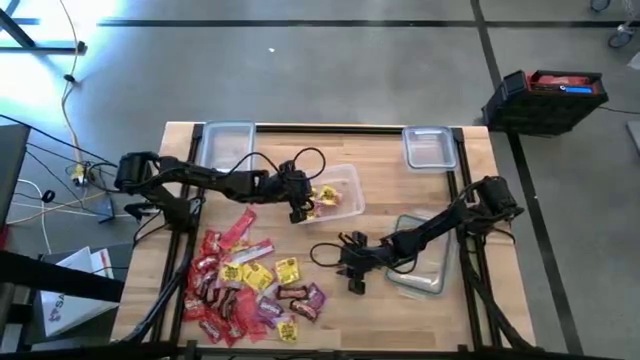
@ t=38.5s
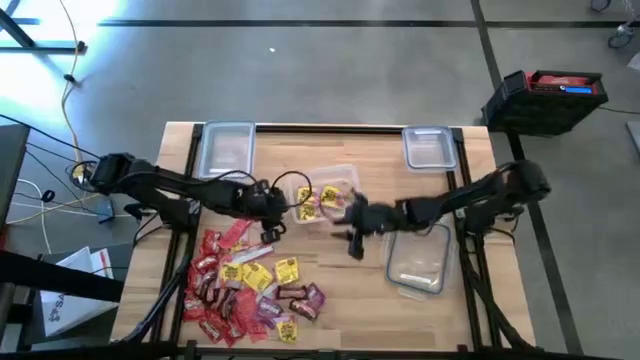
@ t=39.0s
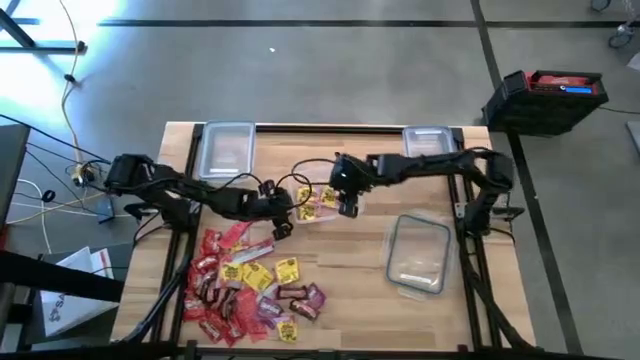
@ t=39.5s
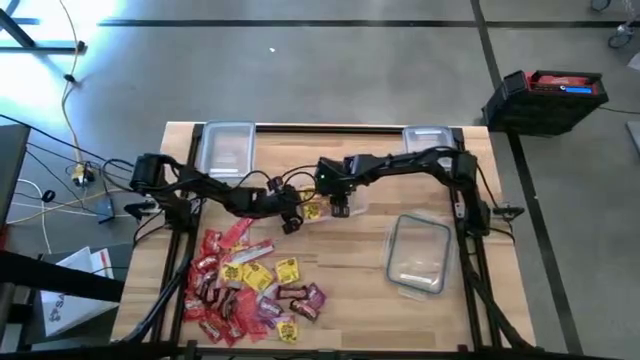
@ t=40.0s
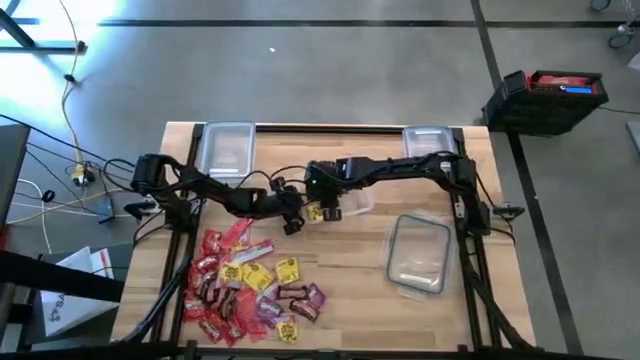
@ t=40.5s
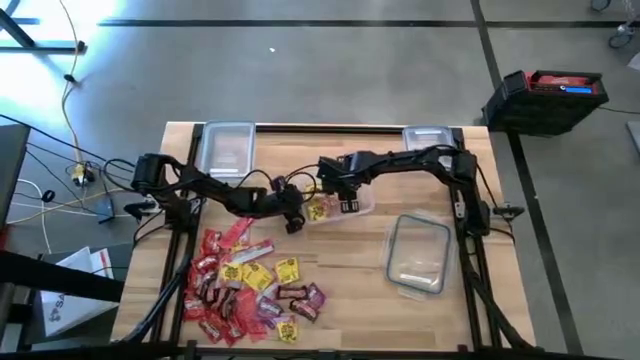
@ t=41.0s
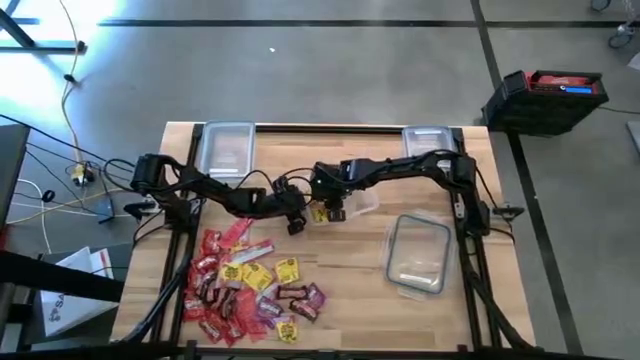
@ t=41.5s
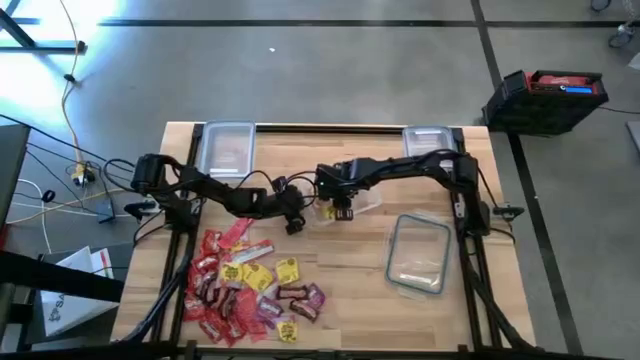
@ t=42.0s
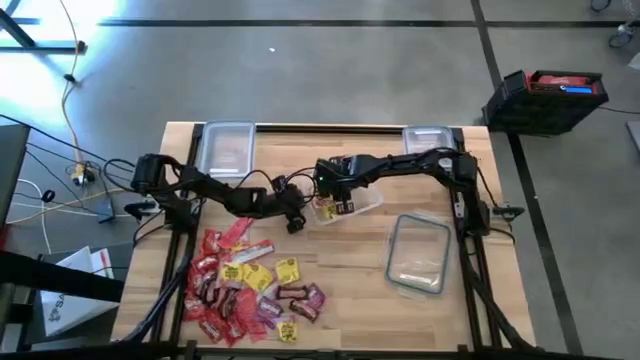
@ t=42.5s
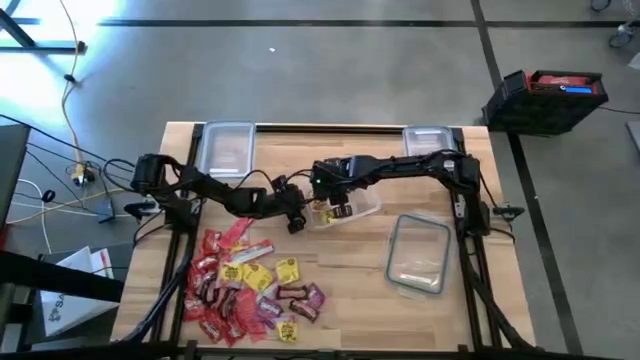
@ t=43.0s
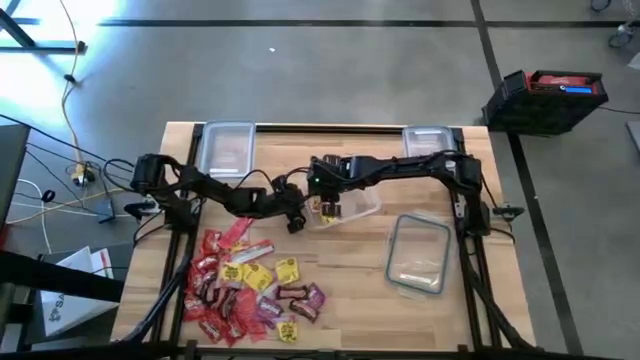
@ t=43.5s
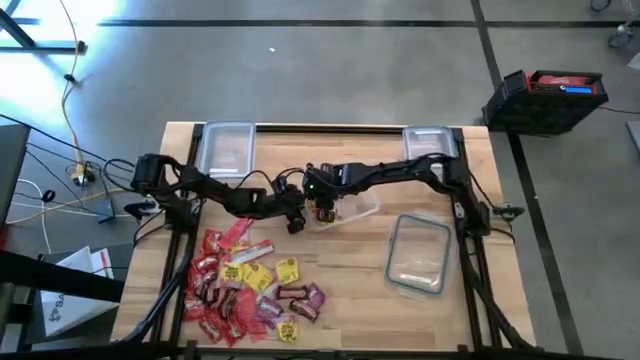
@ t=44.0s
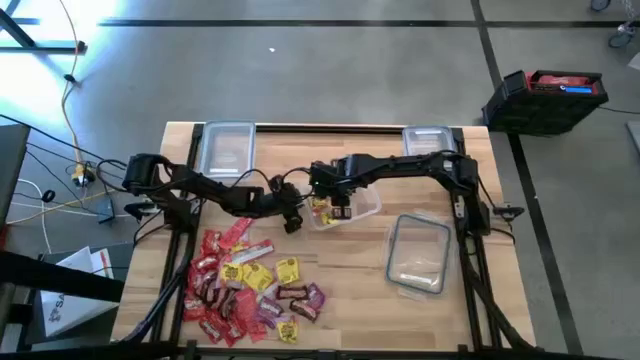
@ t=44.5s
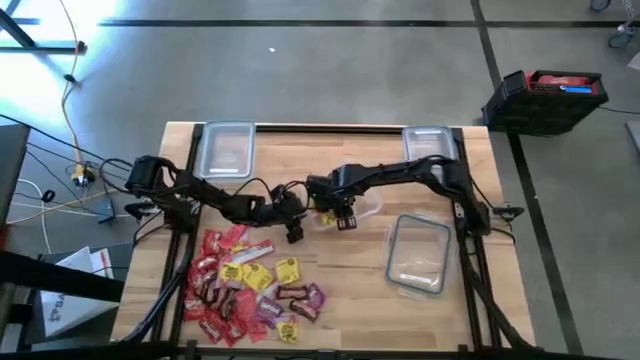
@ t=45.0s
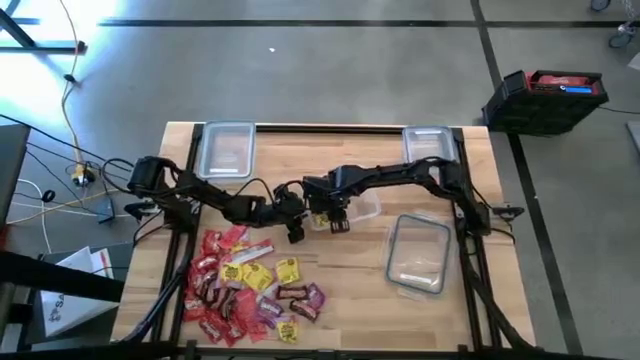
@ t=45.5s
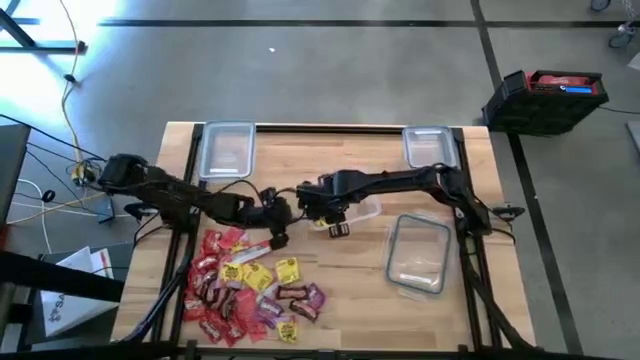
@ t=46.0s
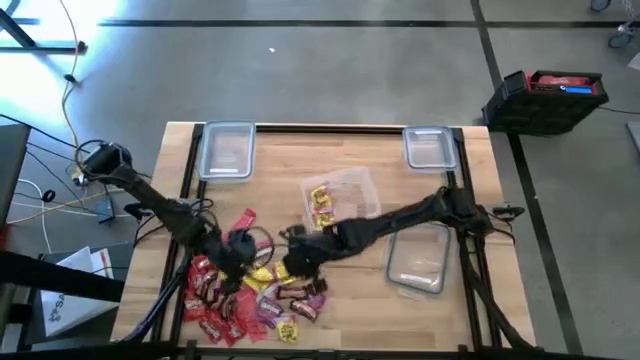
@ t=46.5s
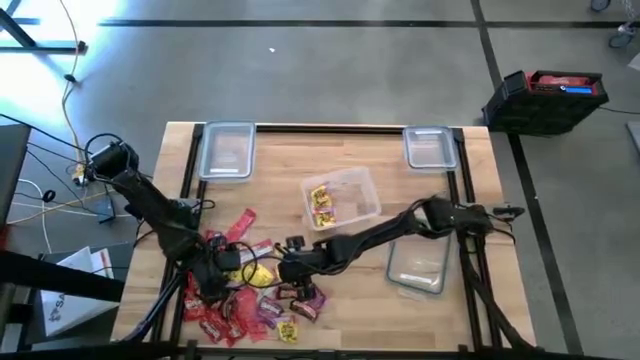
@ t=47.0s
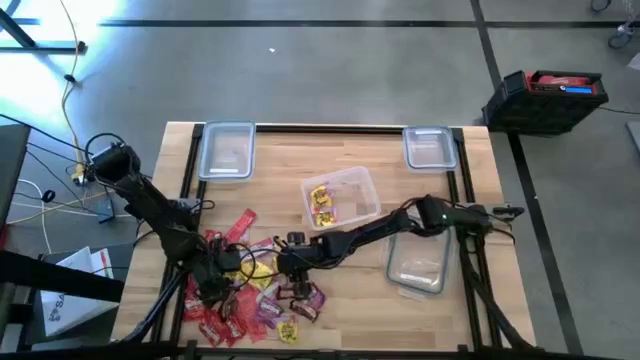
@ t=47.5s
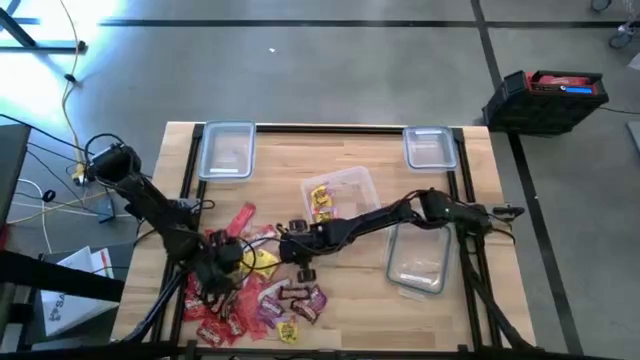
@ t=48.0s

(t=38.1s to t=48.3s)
Task: Sort candy
Put the yellow candy into the center transparent bin

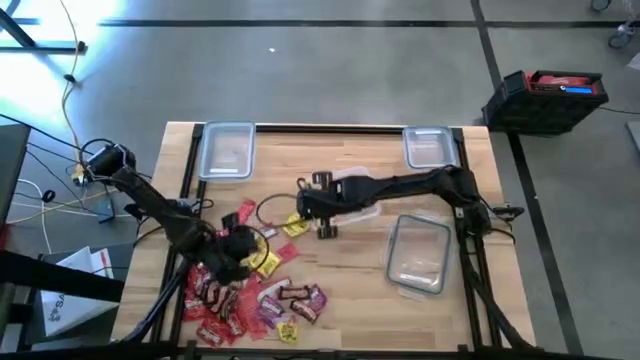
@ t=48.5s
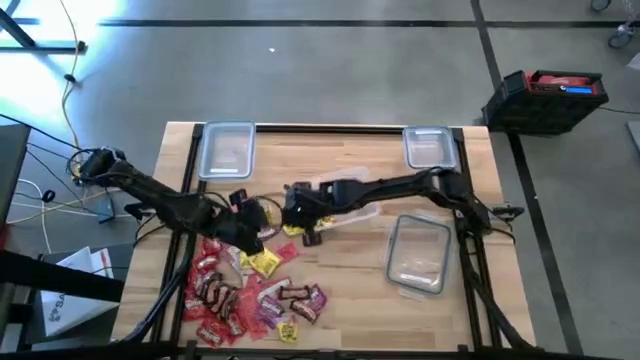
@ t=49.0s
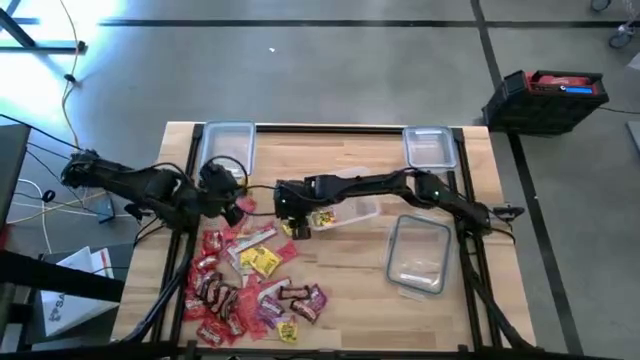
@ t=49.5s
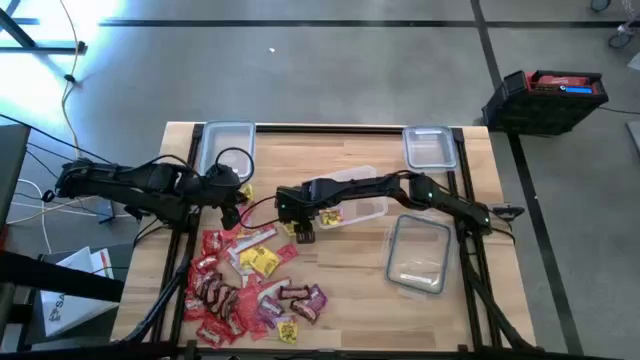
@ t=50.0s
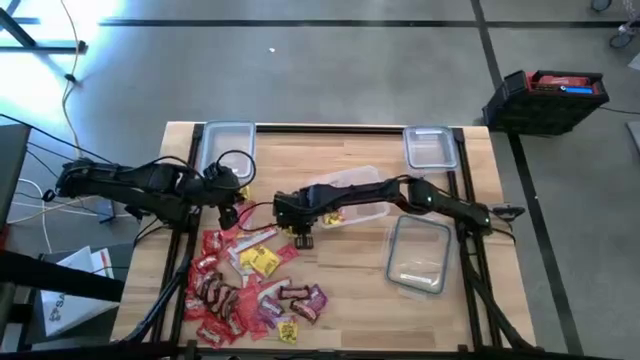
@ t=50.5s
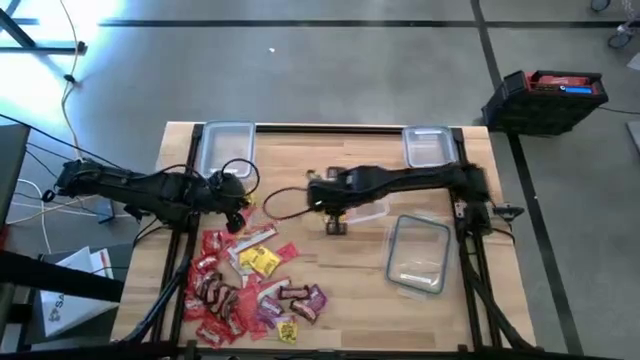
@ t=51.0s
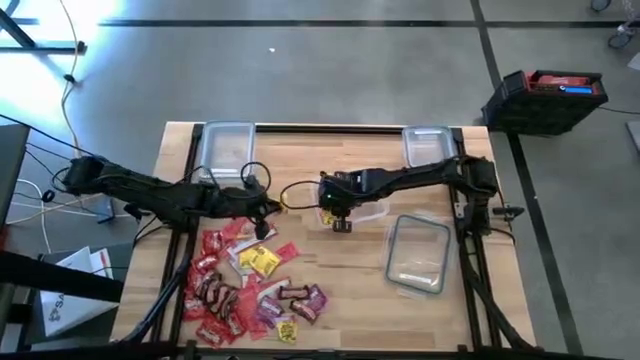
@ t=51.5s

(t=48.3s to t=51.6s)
Put the yellow candy into the center transparent bin

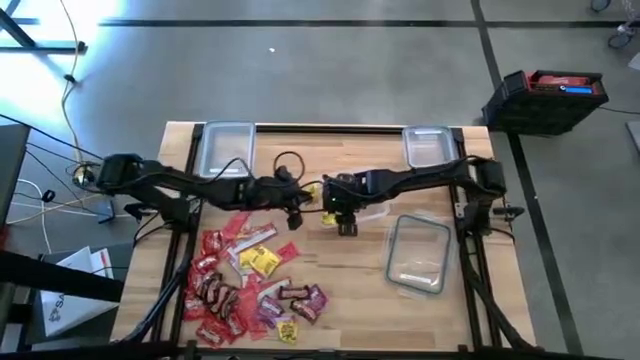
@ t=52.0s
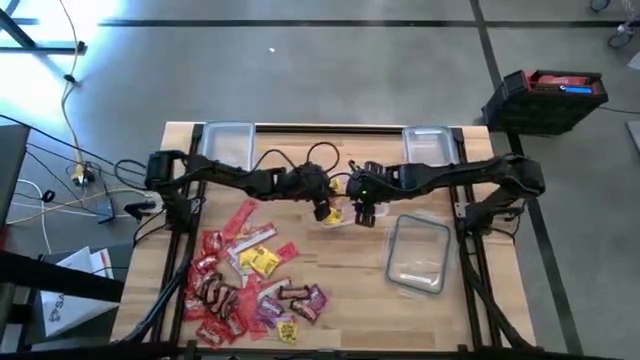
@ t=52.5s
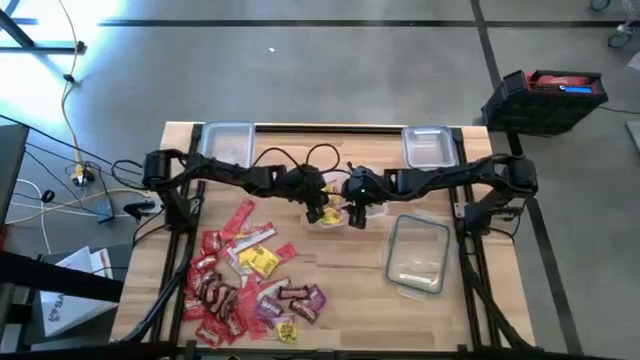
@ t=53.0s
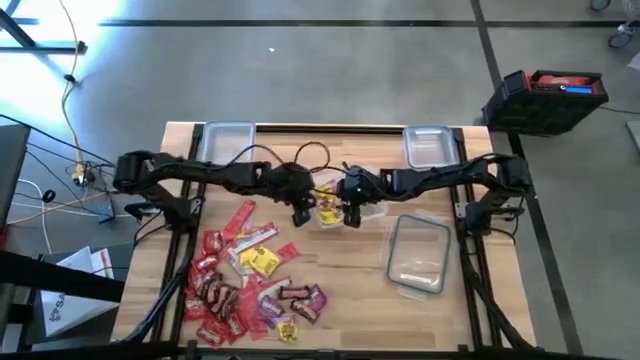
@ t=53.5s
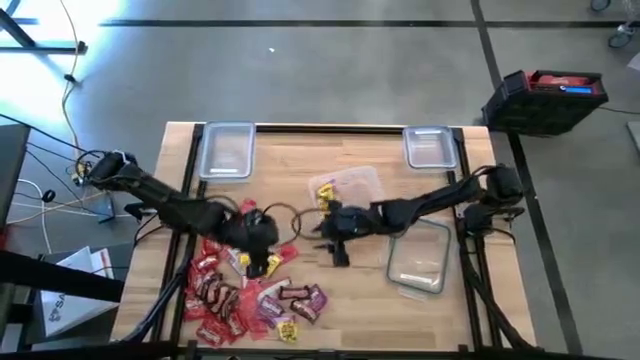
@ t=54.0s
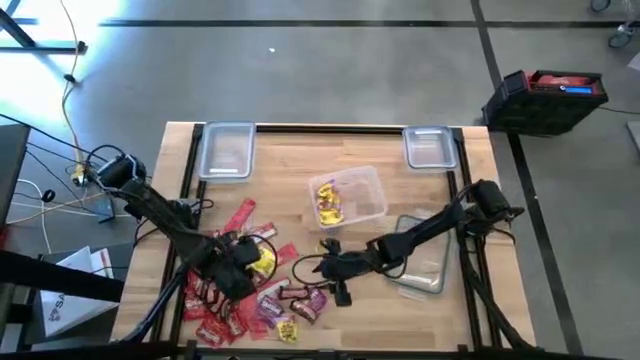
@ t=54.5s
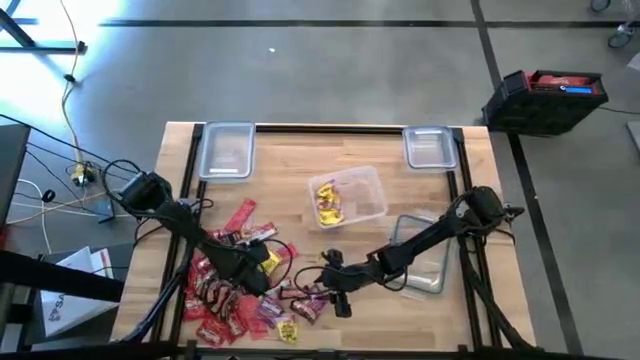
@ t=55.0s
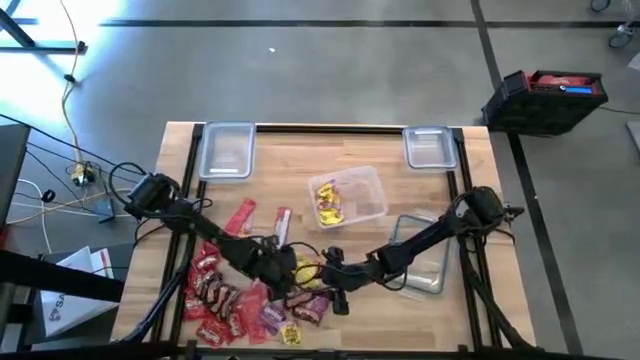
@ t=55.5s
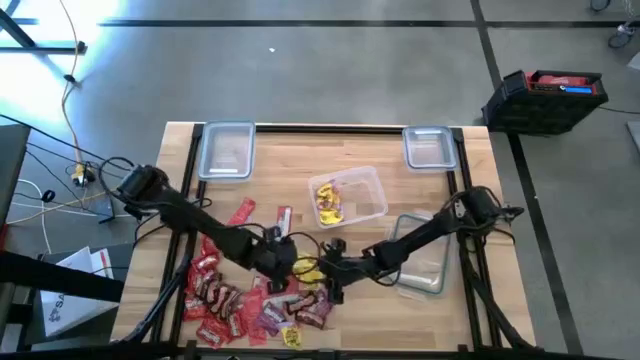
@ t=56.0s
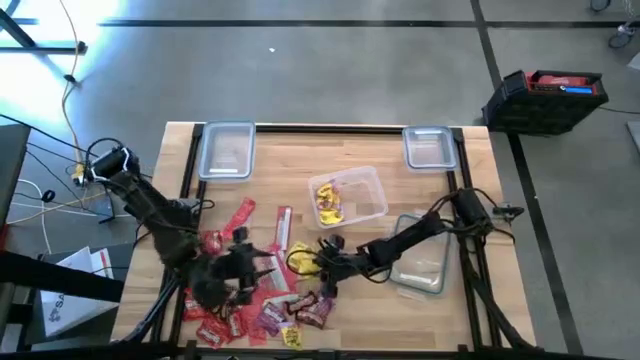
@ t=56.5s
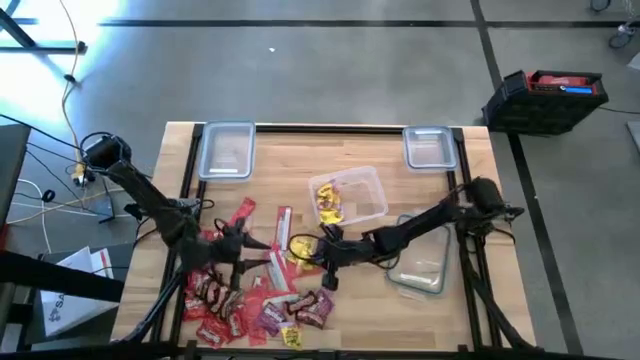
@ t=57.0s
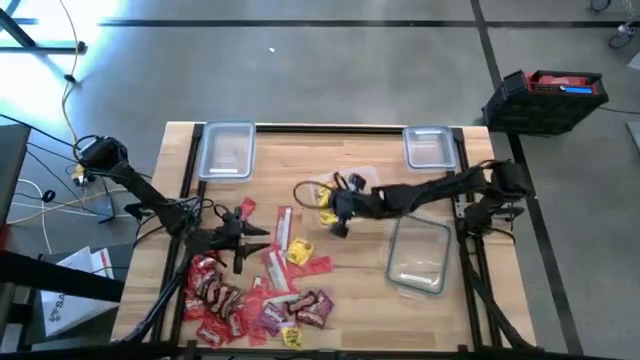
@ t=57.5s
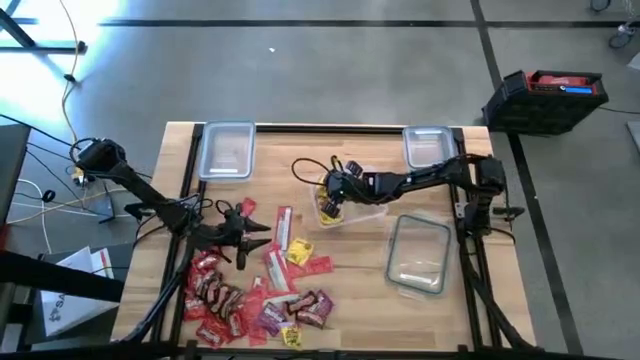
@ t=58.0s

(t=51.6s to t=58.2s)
Put the yellow candy into the center transparent bin

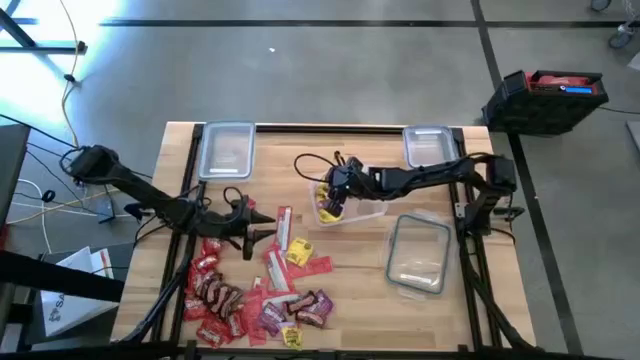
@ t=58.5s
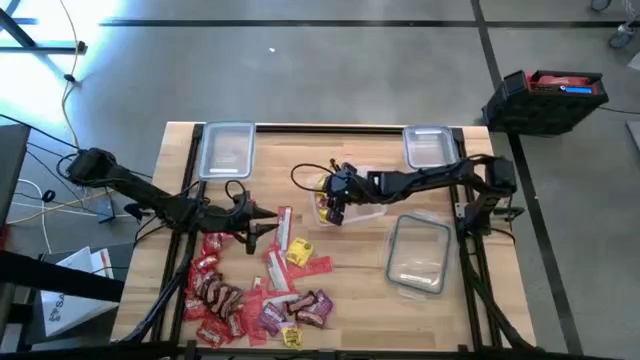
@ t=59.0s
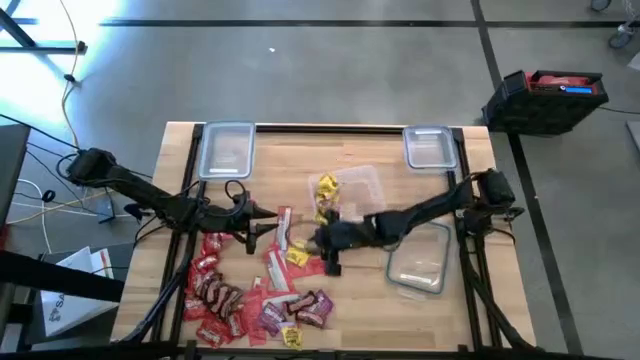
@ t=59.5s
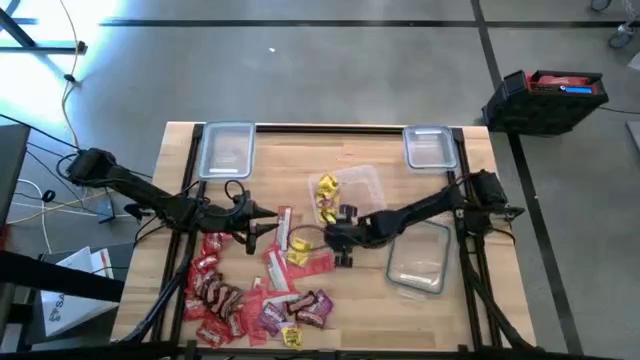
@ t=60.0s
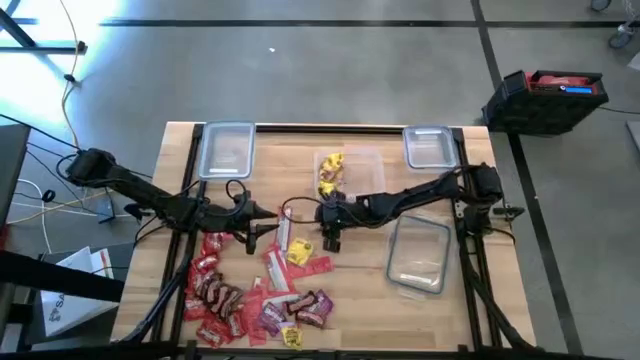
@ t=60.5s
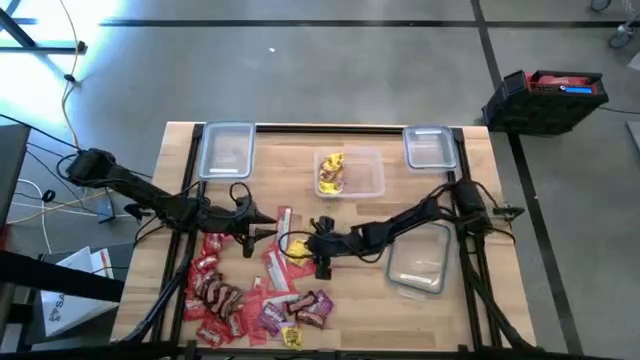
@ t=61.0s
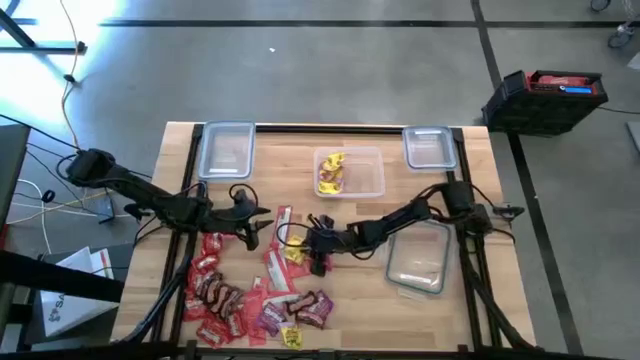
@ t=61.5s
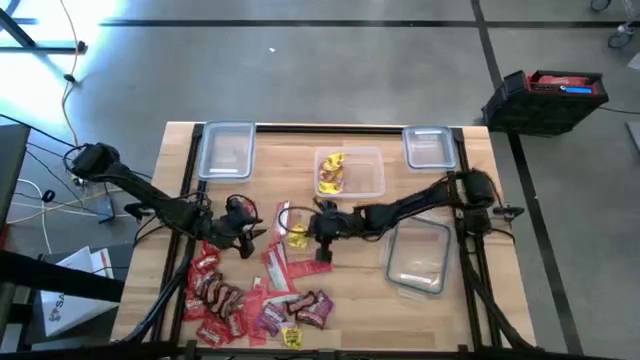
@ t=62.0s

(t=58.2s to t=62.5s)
Put the center yellow candy into the center transparent bin
